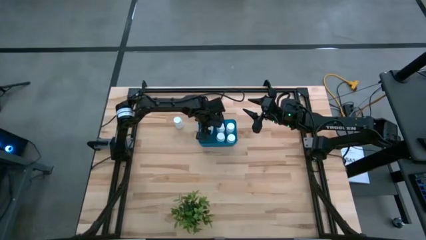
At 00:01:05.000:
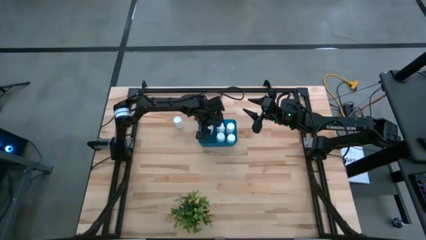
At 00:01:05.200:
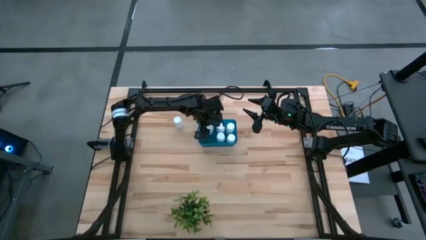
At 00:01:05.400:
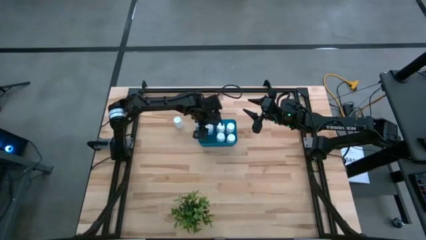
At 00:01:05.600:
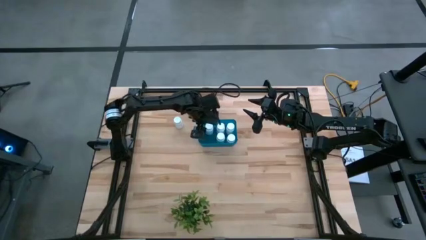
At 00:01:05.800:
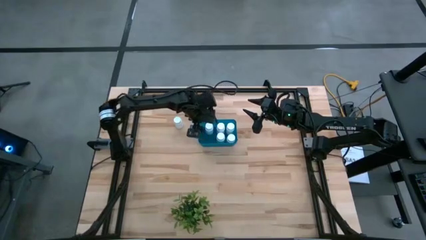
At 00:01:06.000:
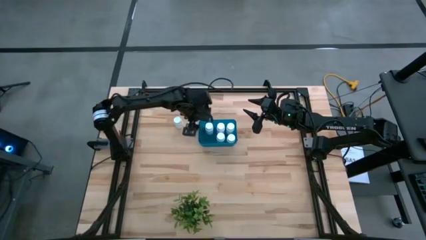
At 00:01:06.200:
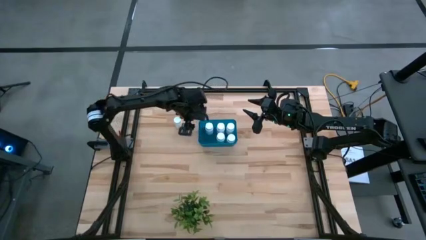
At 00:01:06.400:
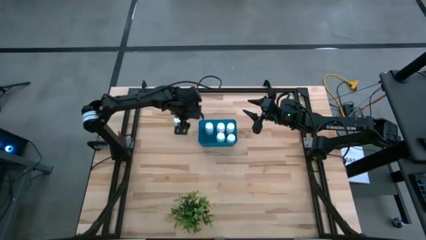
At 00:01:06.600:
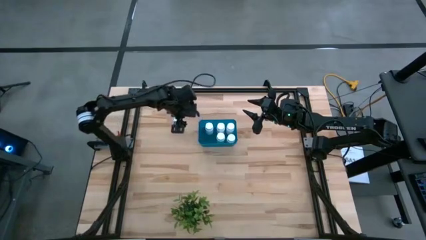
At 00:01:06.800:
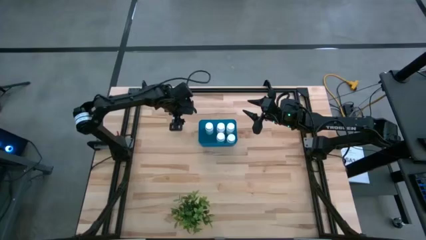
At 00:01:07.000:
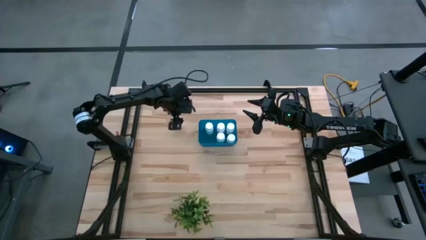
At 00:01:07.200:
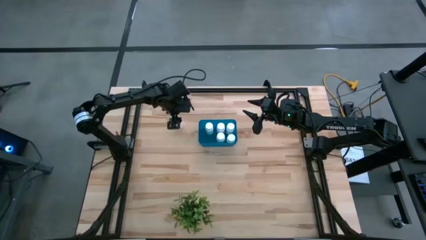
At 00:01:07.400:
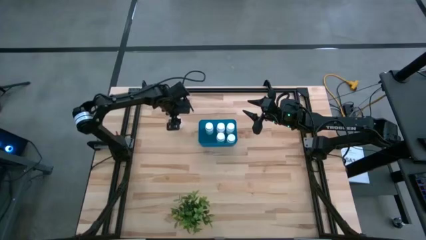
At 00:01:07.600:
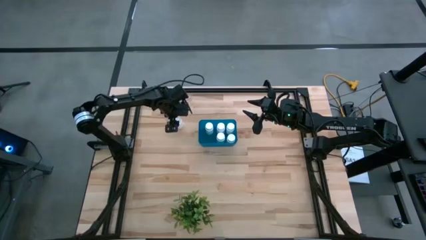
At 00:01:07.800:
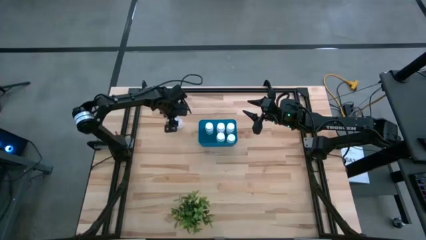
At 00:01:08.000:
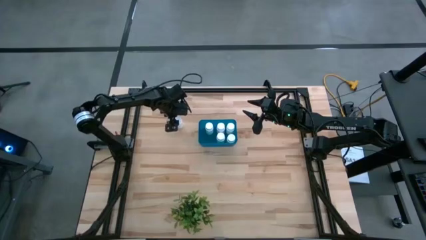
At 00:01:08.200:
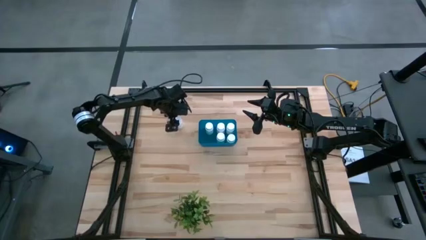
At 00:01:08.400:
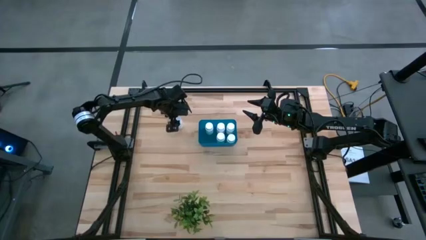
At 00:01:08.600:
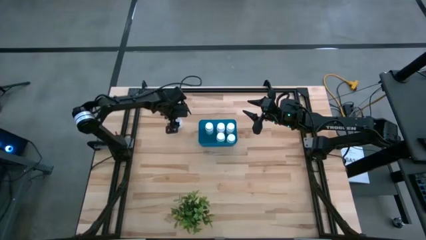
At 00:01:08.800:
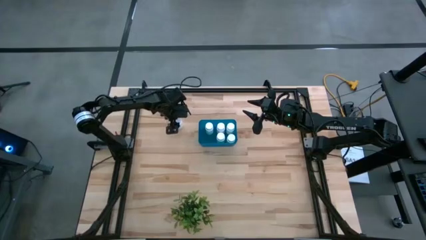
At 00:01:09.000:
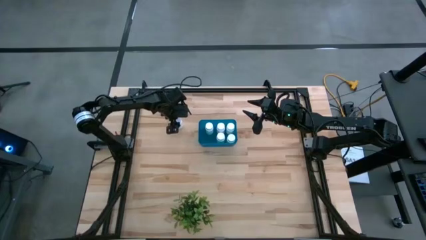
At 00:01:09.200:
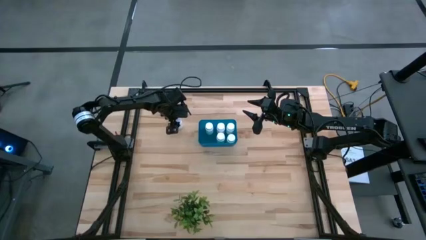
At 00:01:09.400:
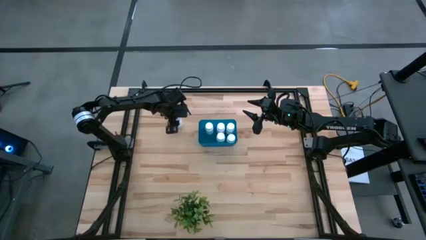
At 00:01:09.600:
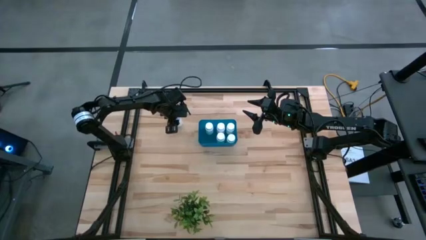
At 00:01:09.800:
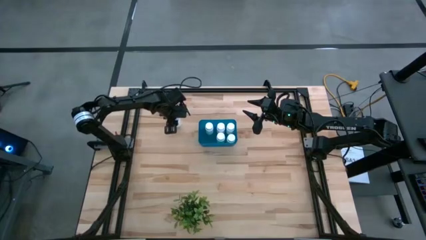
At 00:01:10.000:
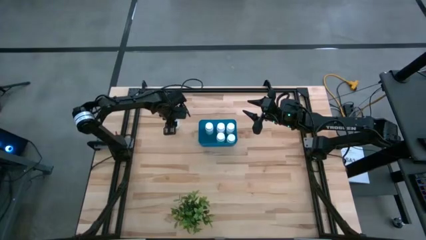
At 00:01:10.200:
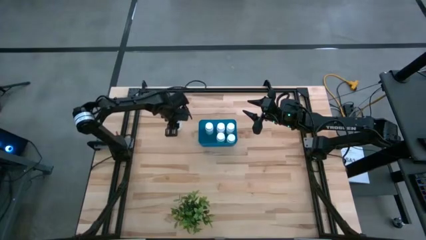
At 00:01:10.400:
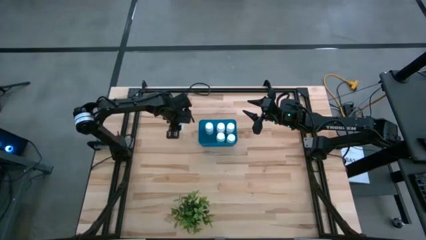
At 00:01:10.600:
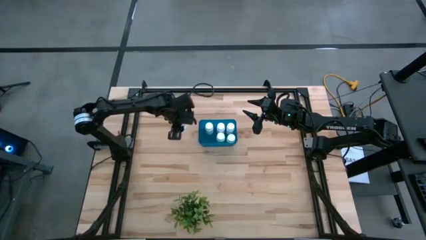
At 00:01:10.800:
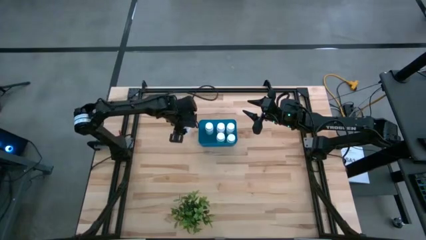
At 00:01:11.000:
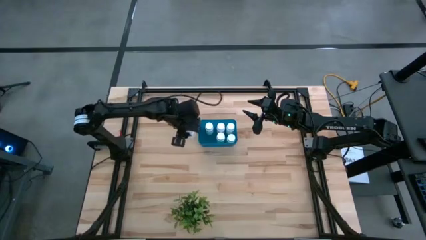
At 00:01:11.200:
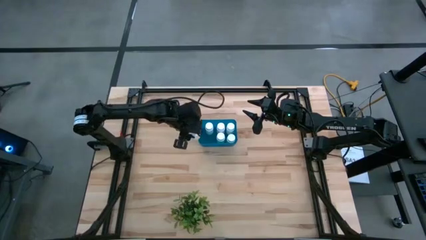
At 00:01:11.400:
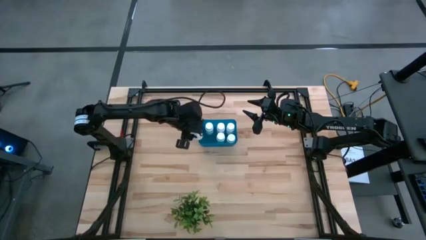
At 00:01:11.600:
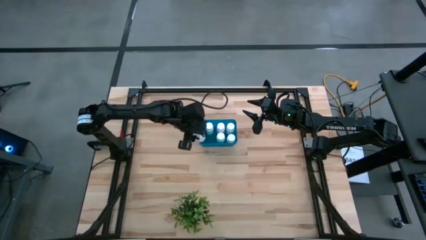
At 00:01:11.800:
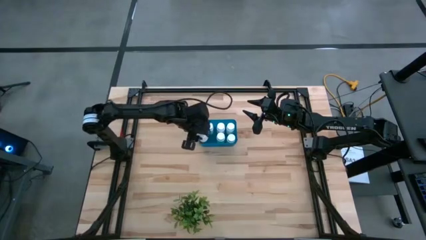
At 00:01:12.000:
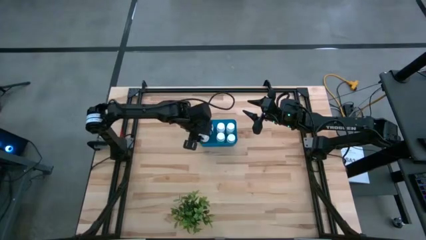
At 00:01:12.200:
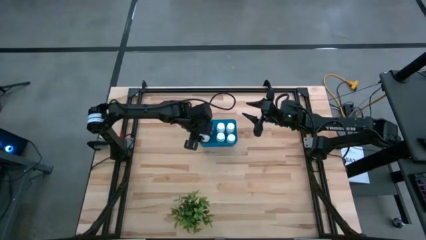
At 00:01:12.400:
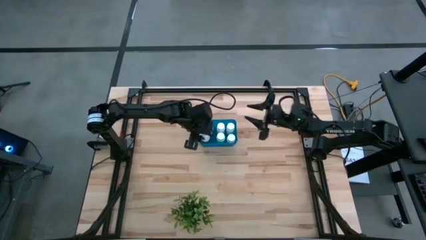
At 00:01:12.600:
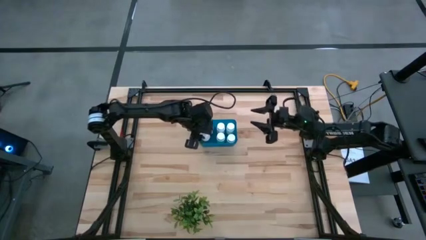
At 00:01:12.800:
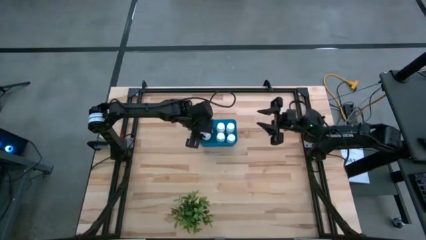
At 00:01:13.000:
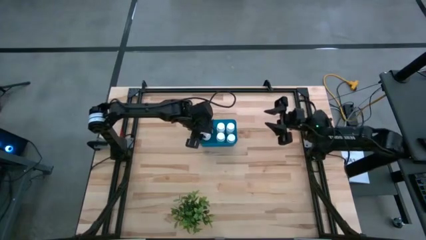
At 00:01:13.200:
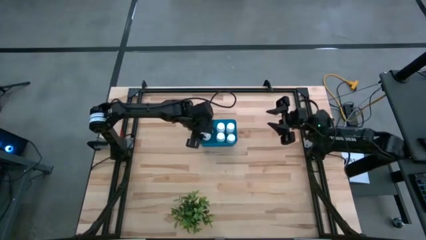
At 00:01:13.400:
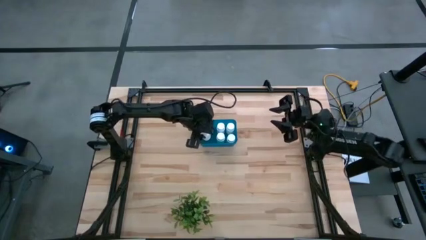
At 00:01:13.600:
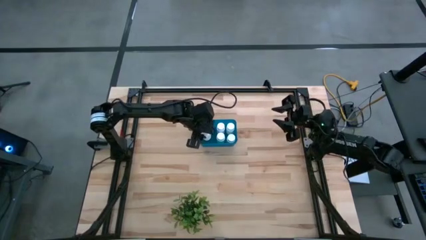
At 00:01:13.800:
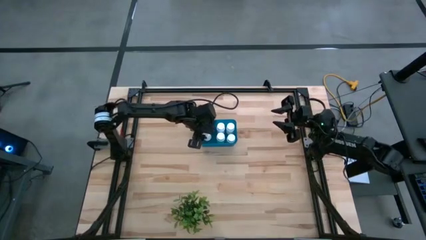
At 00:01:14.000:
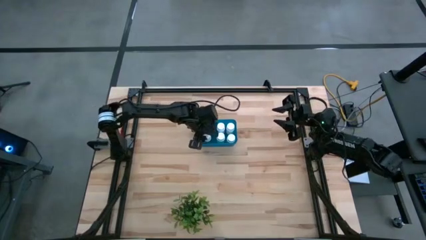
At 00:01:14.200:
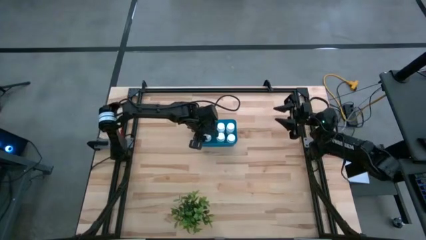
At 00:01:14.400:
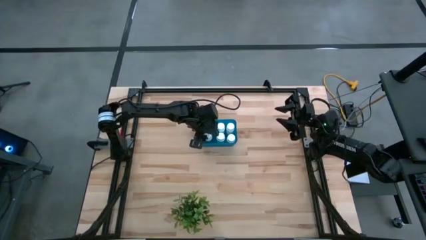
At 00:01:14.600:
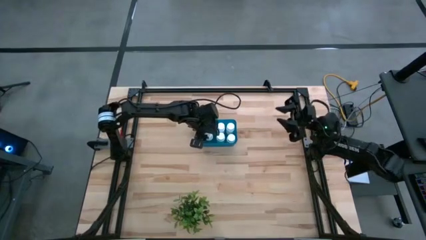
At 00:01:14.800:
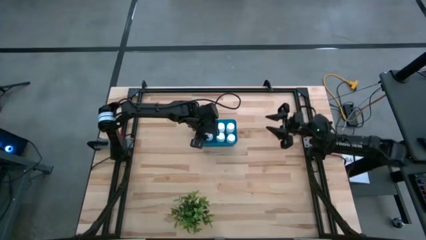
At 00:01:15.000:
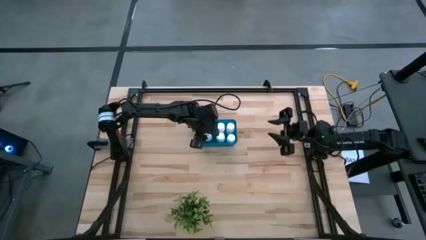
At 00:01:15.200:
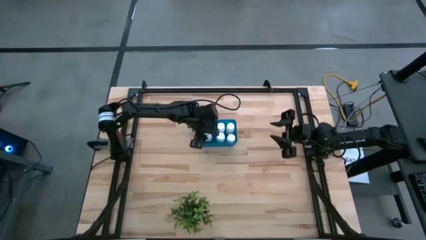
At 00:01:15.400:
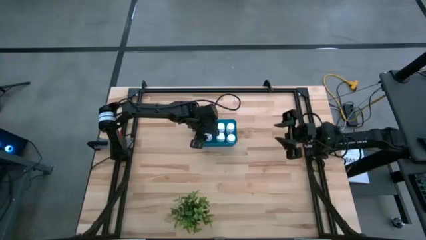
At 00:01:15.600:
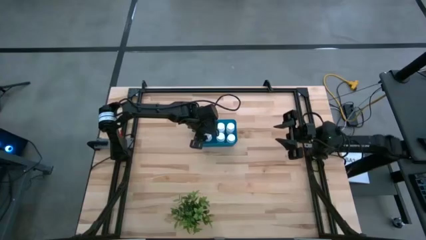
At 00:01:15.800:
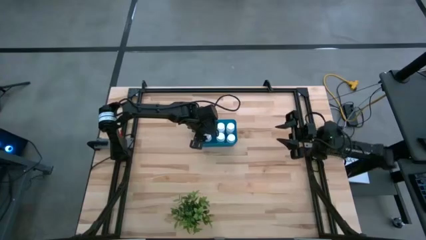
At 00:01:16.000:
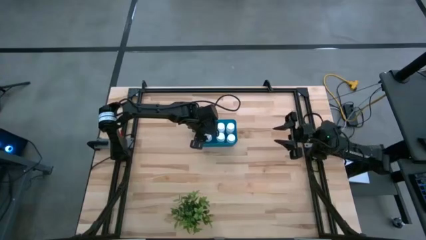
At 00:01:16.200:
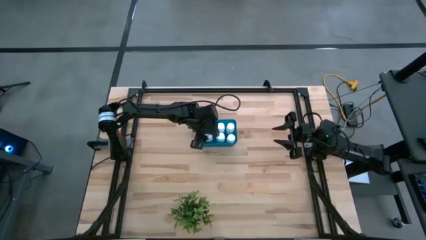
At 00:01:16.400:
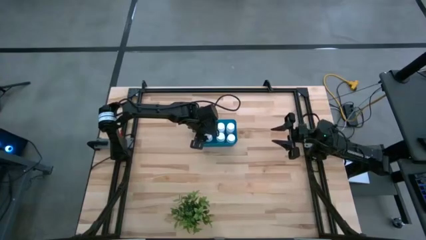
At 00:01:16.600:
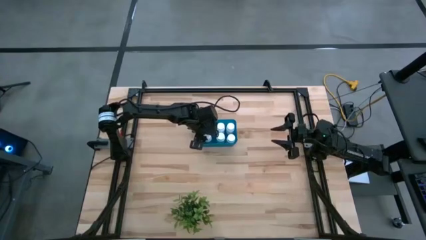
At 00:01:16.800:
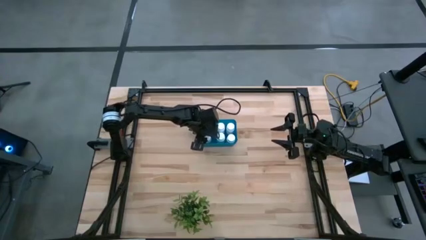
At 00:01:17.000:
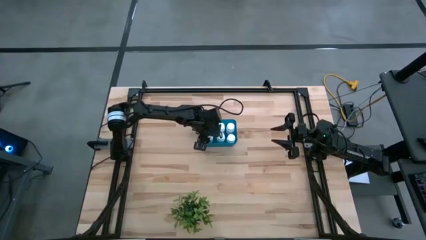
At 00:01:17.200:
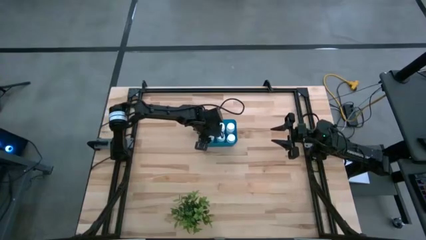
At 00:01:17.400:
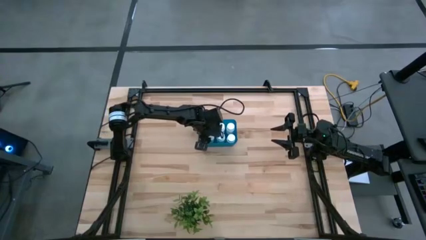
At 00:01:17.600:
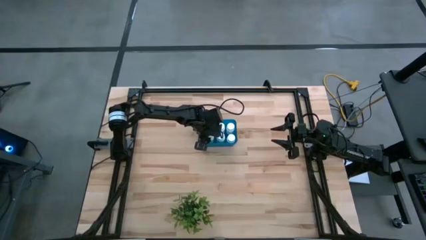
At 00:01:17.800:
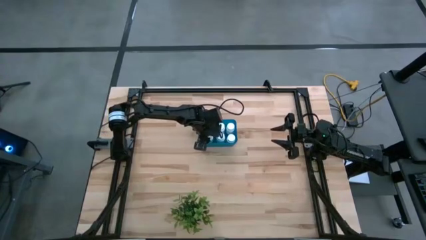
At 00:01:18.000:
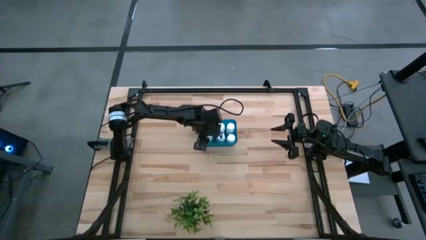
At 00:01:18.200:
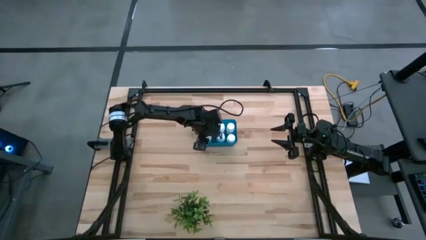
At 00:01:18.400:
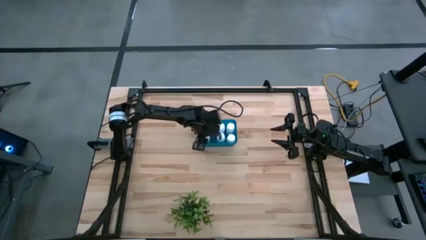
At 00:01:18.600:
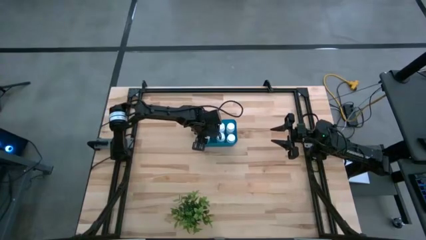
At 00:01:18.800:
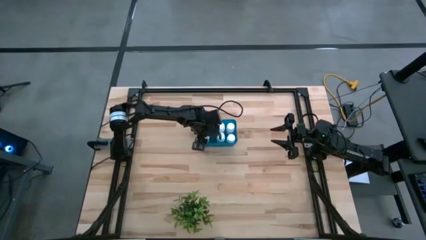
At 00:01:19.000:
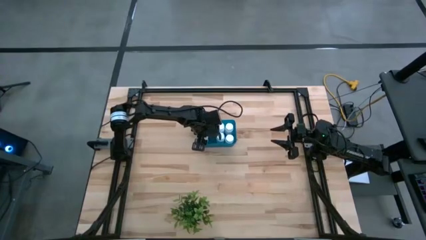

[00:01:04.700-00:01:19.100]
Task: Pick and place pill bottles into a basket
Put the white medicine bottle into the blue bin
